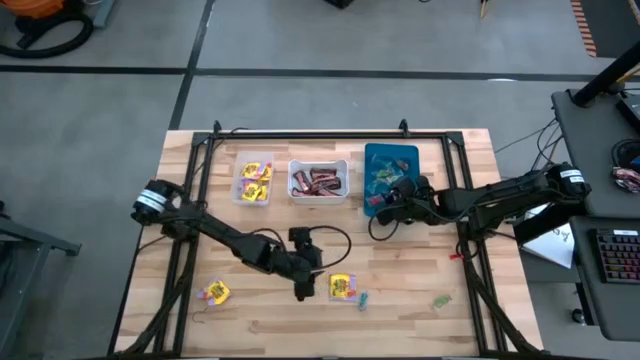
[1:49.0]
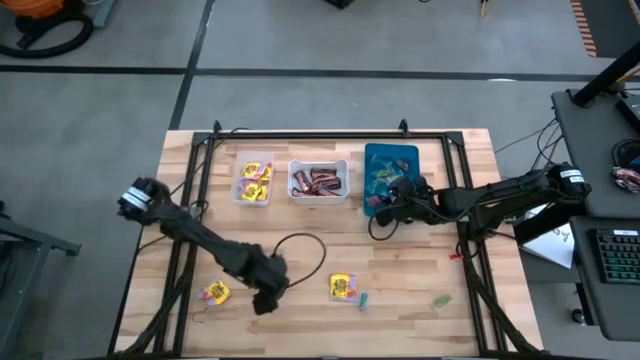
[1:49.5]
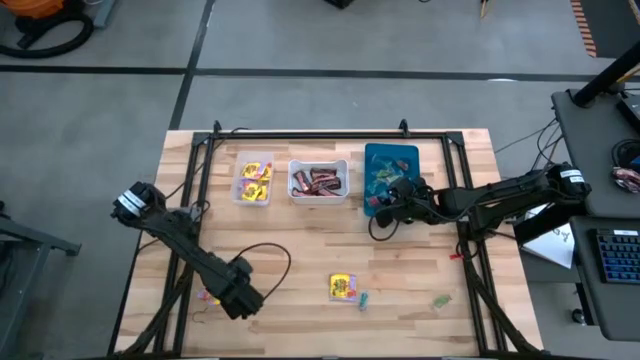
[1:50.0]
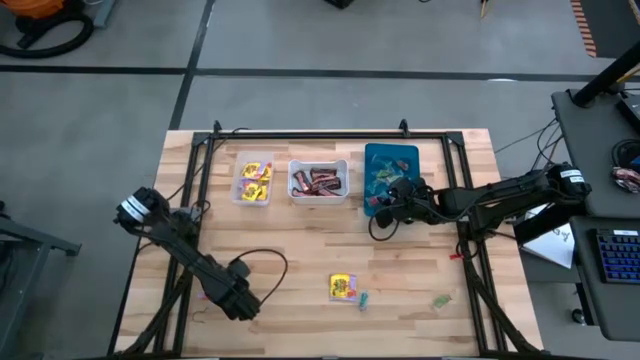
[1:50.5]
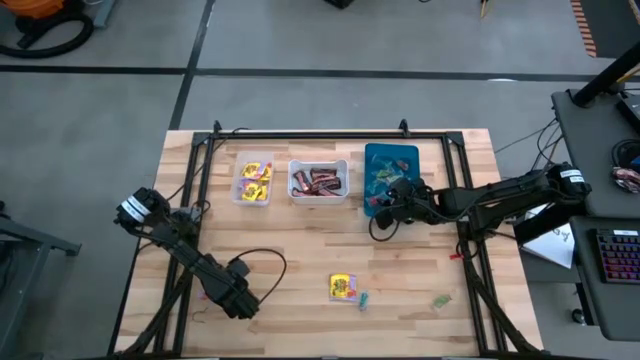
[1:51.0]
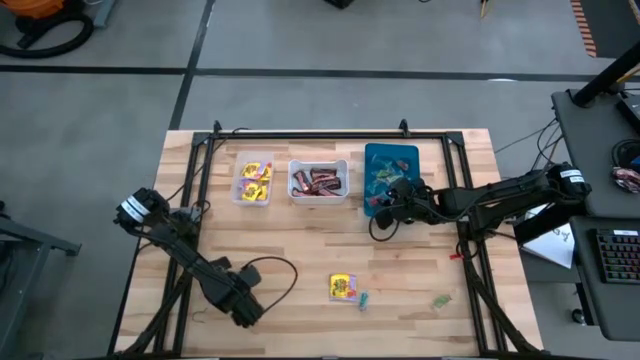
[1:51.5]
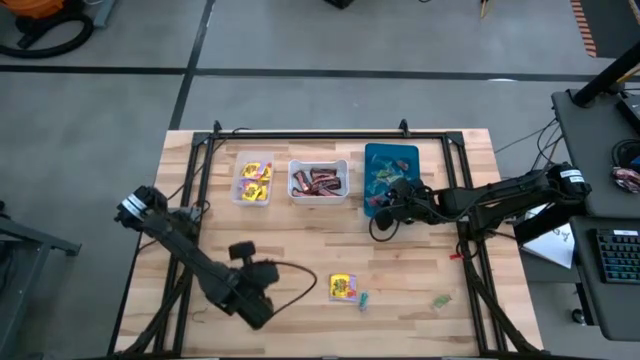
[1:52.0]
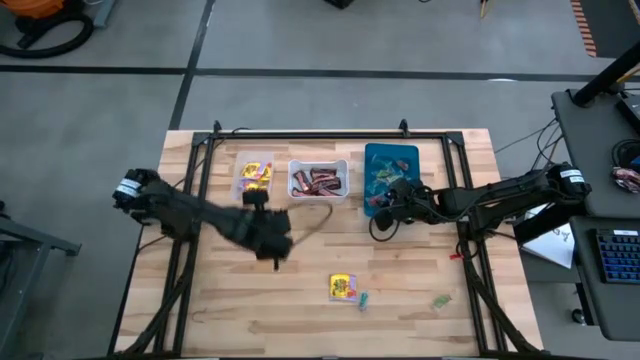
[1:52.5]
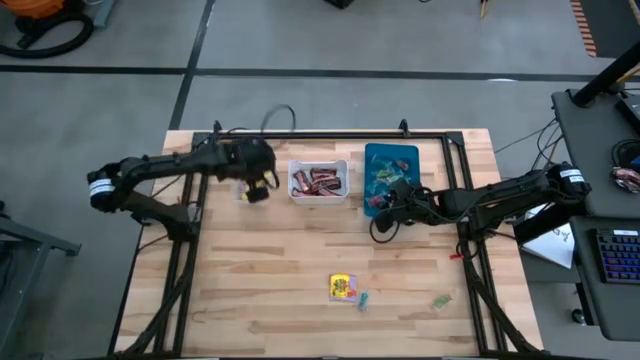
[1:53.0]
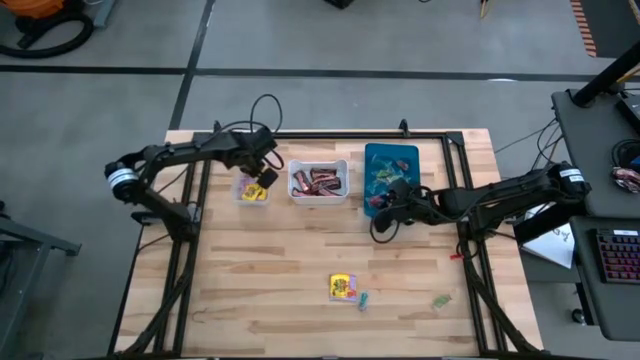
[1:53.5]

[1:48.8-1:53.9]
Task: Sort candy
Put the yellow candy into the transparent bin

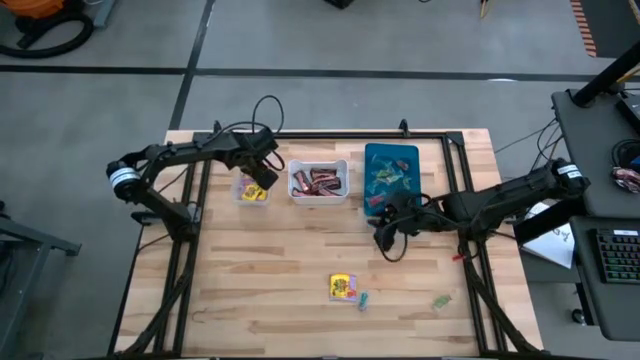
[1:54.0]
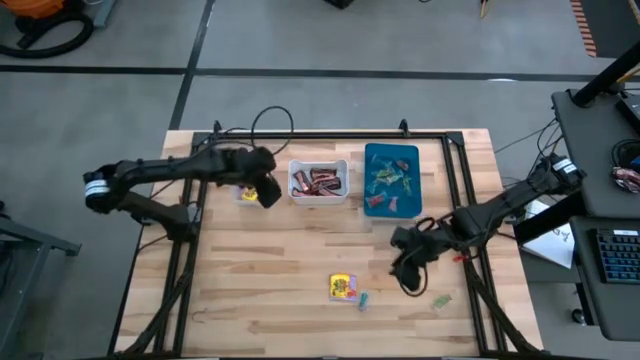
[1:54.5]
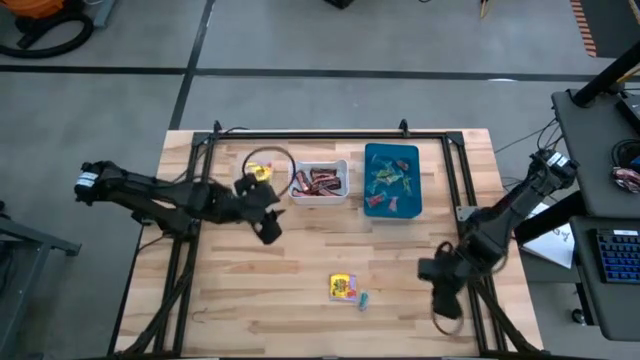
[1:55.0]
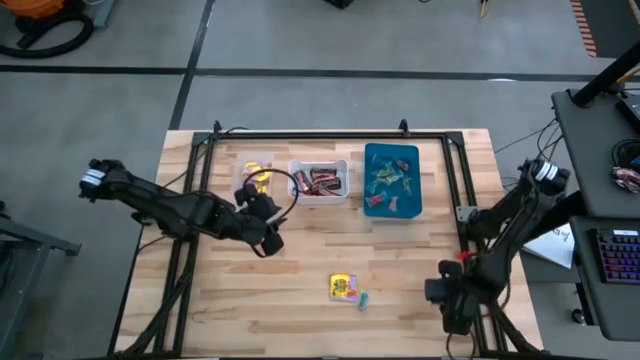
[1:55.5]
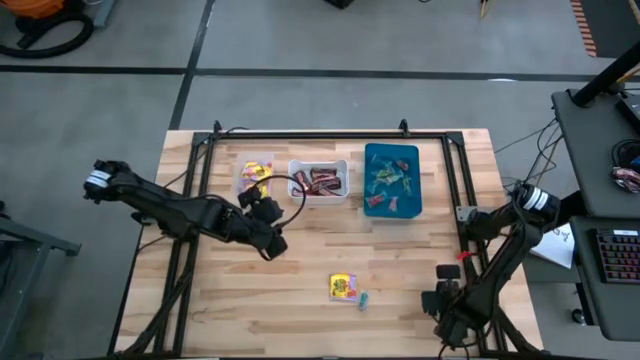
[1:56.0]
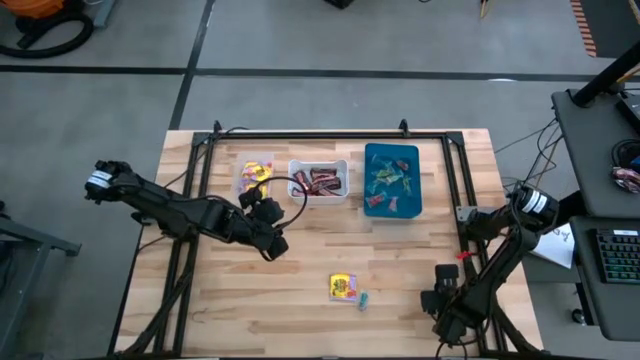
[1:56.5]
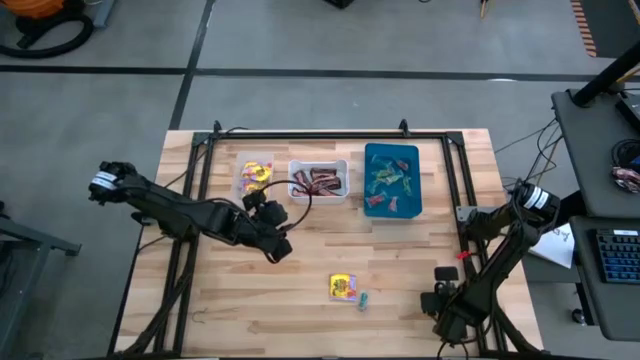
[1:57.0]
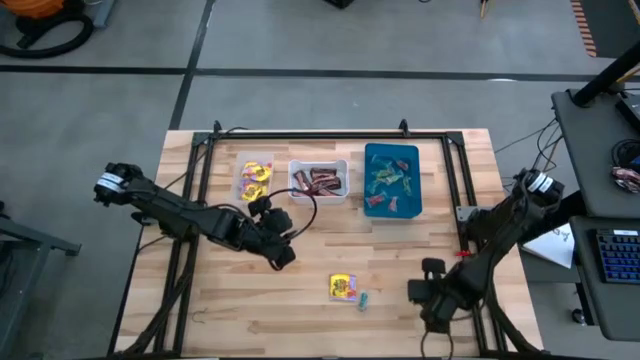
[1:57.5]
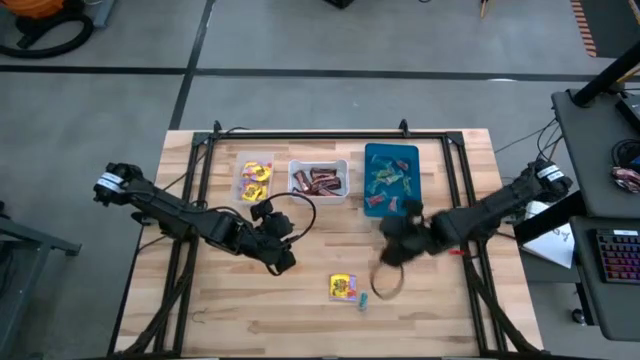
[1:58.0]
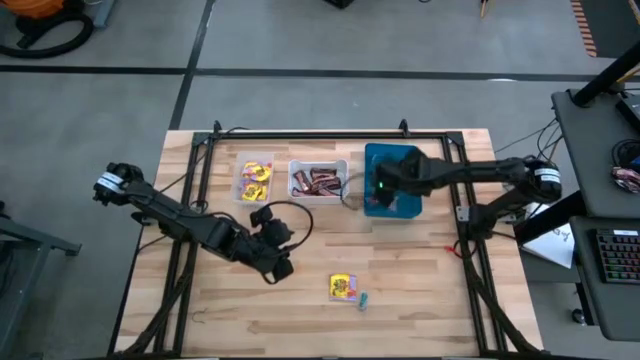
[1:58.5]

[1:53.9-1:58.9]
Put the green candy into the blue bin

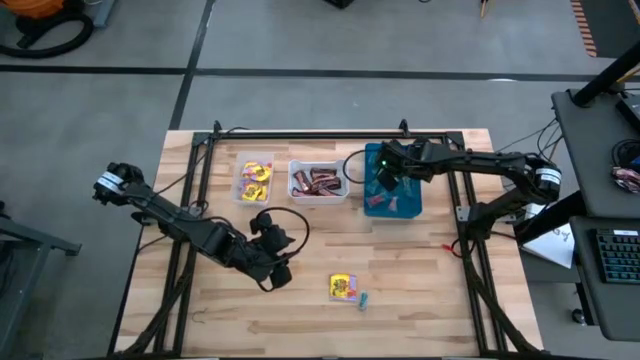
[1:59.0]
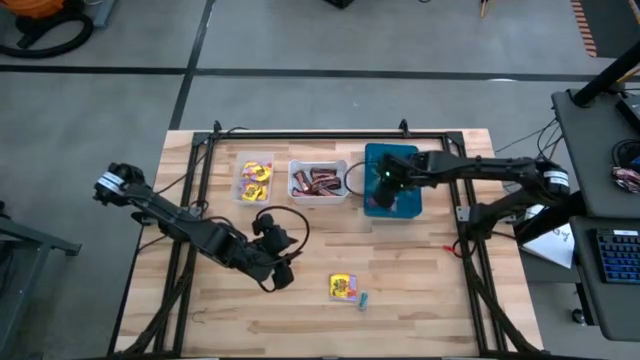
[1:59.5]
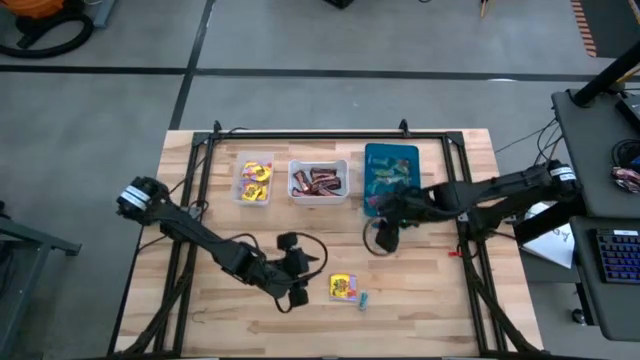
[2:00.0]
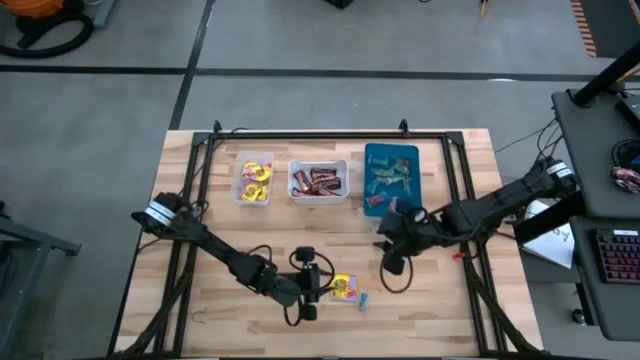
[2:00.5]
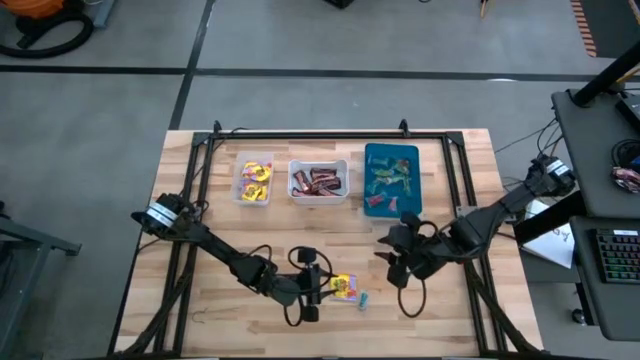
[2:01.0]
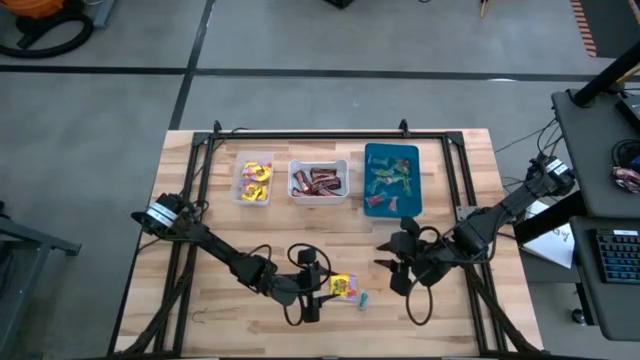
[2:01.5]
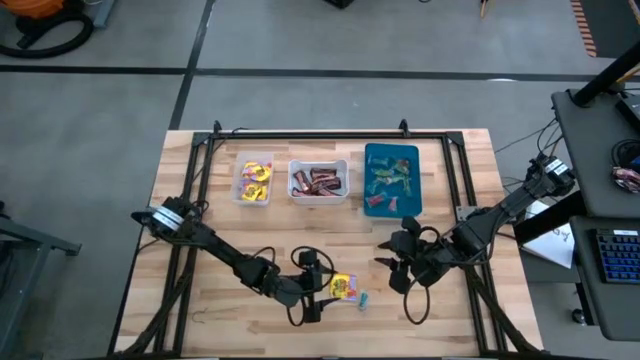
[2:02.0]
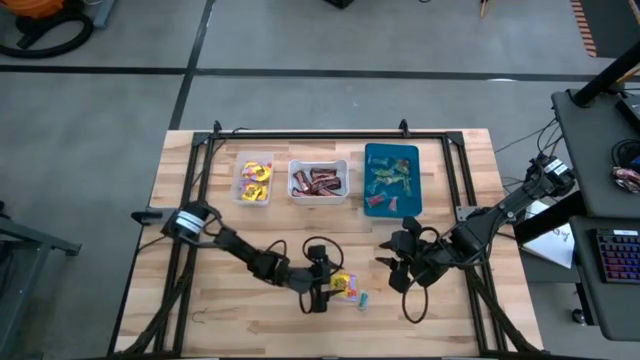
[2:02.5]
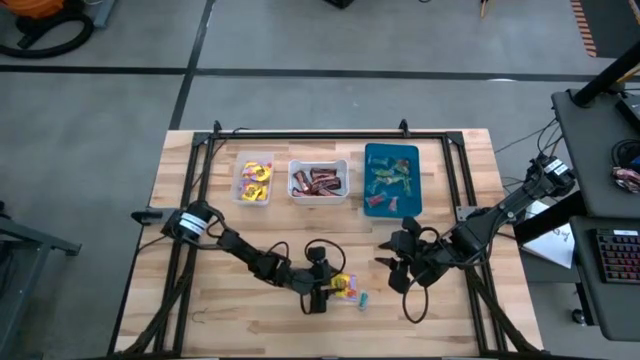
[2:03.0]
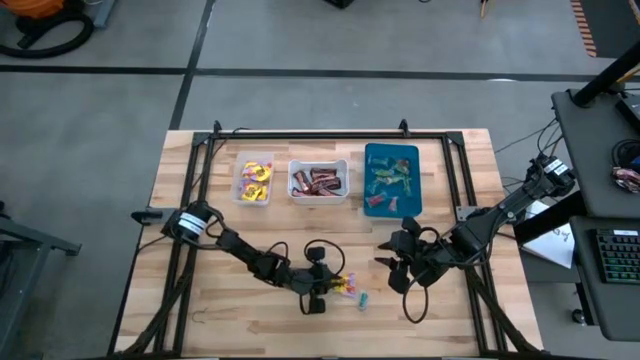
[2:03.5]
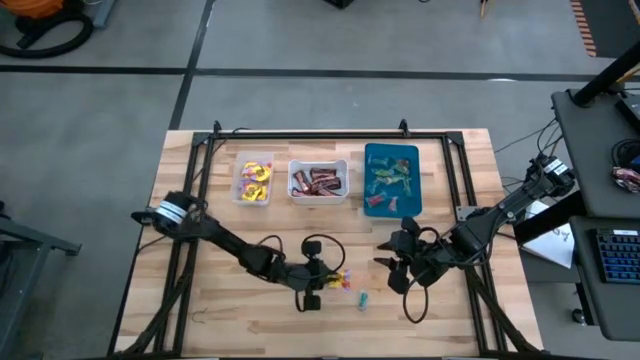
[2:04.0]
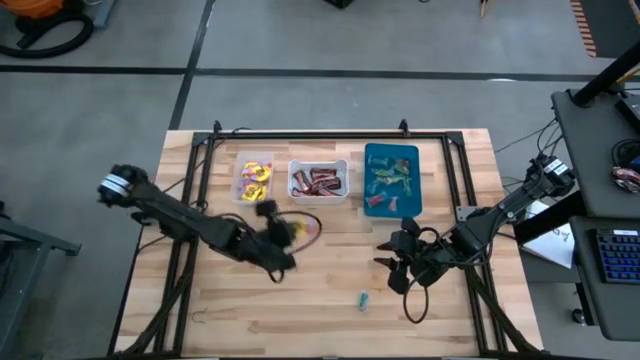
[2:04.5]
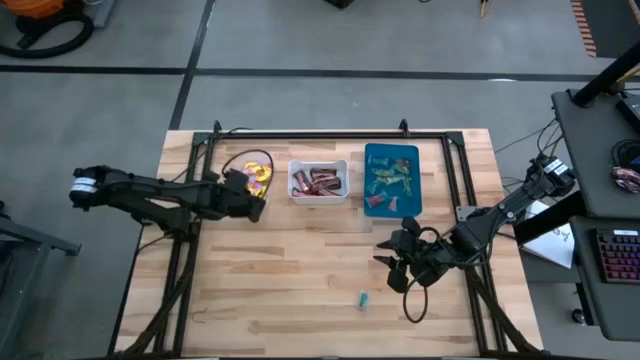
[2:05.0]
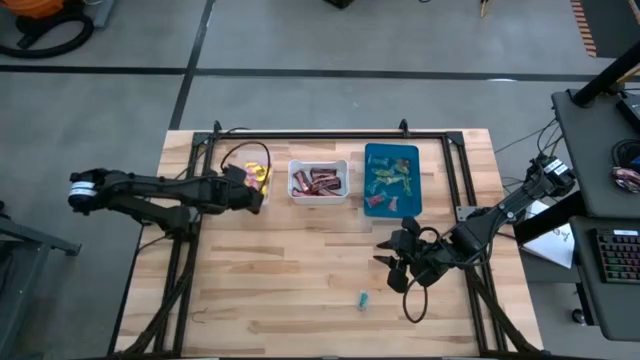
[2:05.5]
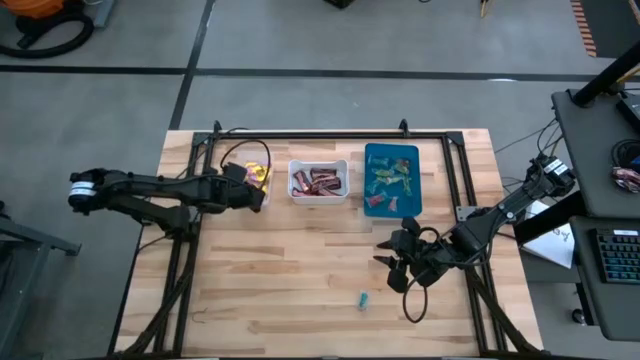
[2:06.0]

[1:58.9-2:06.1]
Put the yellow candy into the transparent bin

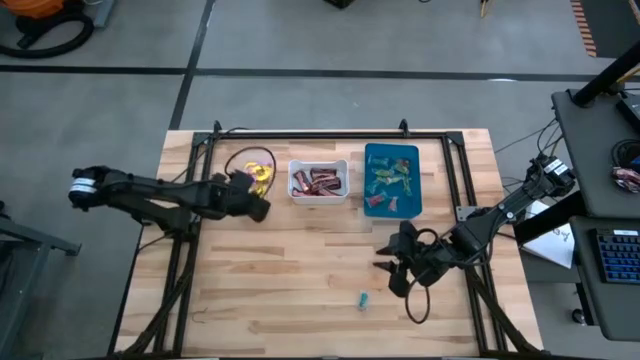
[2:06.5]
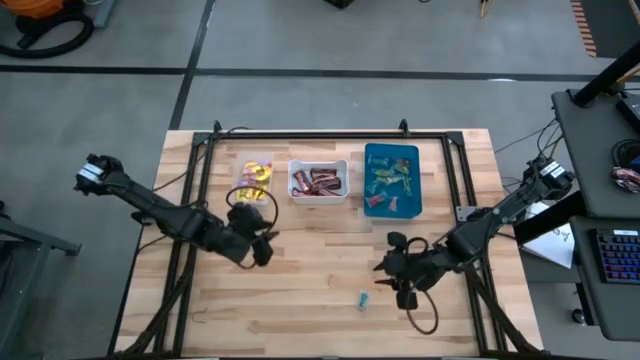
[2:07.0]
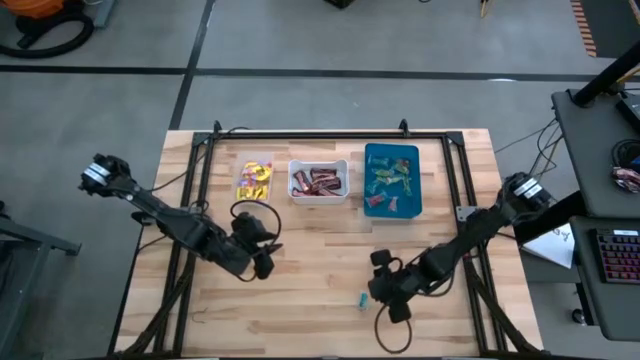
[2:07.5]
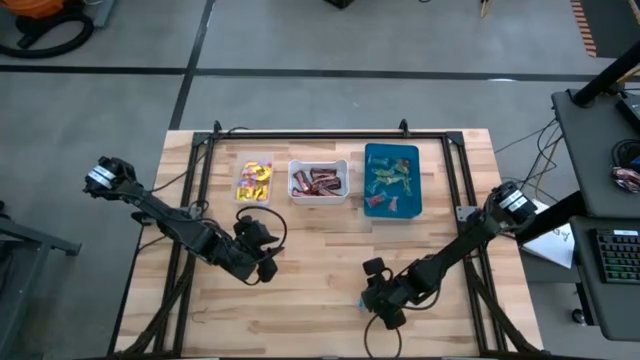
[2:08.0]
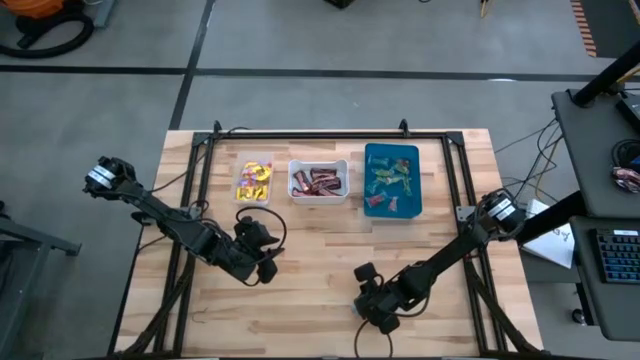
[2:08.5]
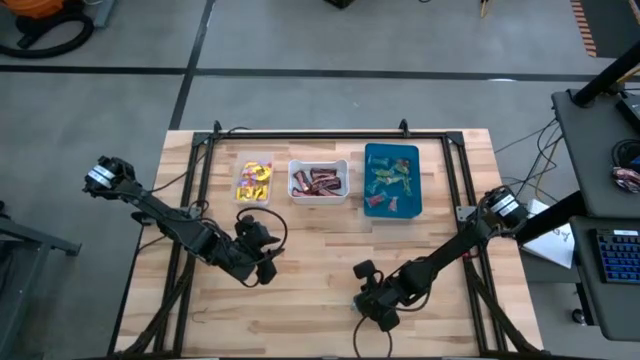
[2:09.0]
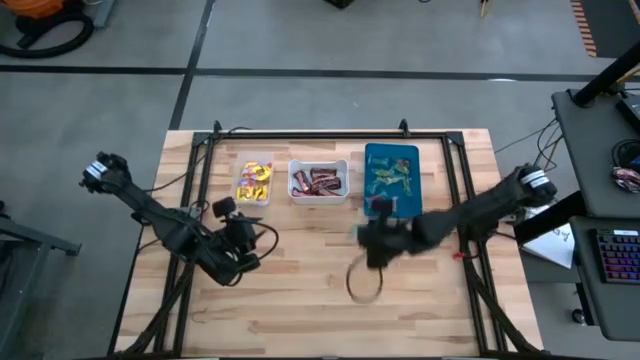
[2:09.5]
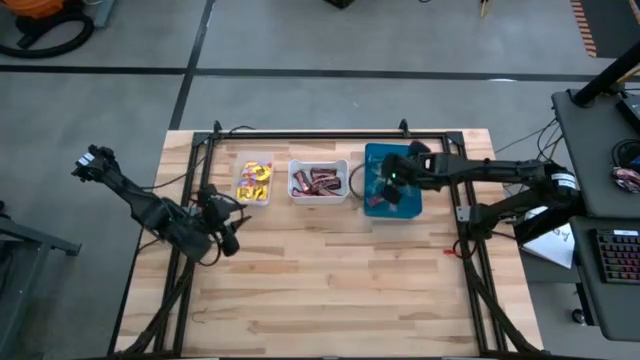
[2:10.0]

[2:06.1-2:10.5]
Put the blue candy into the blue bin
